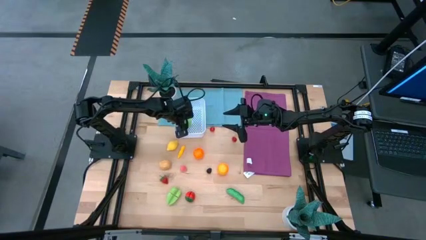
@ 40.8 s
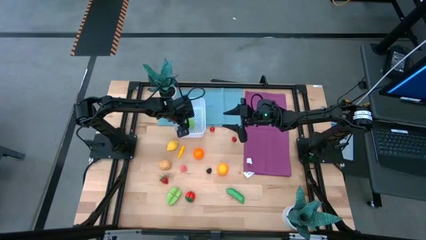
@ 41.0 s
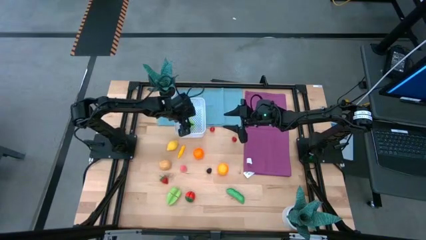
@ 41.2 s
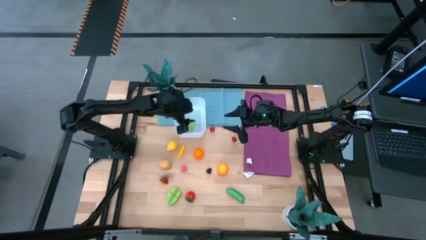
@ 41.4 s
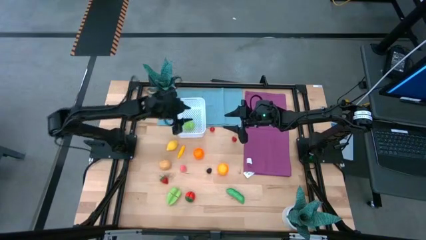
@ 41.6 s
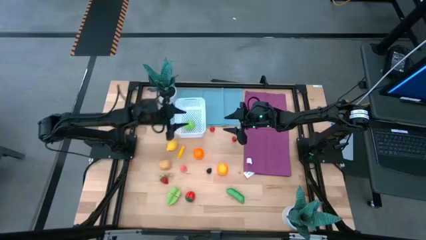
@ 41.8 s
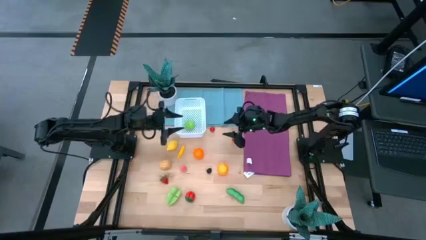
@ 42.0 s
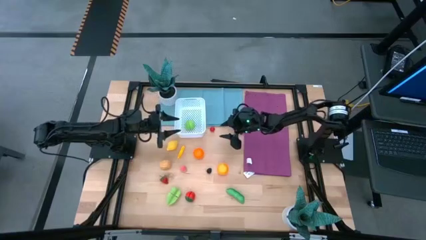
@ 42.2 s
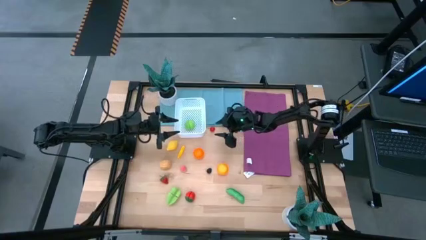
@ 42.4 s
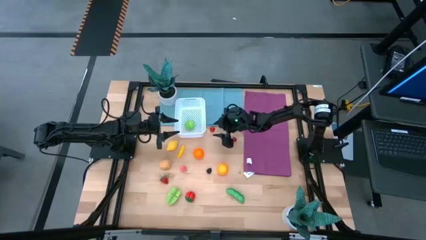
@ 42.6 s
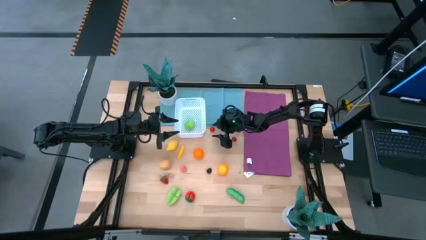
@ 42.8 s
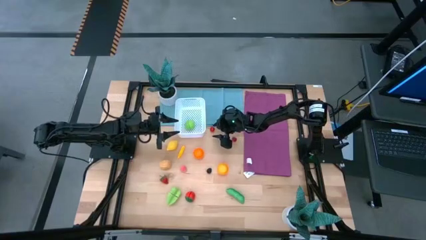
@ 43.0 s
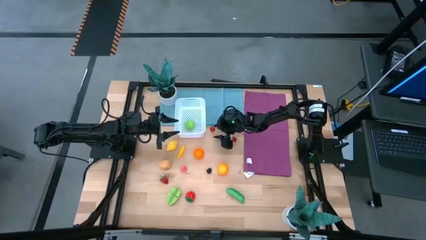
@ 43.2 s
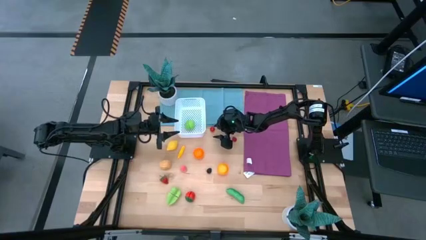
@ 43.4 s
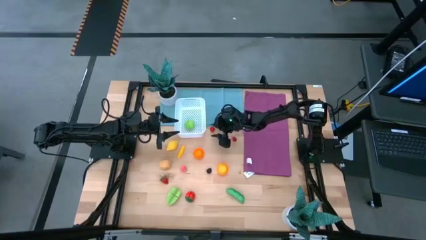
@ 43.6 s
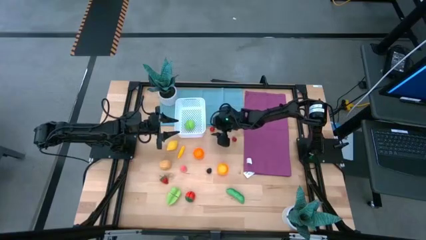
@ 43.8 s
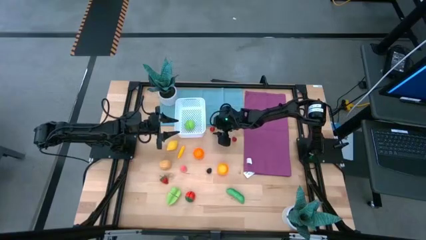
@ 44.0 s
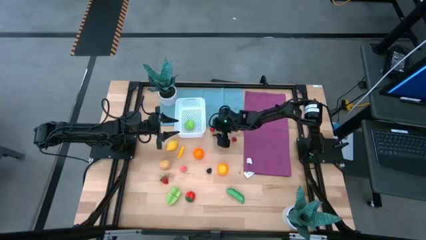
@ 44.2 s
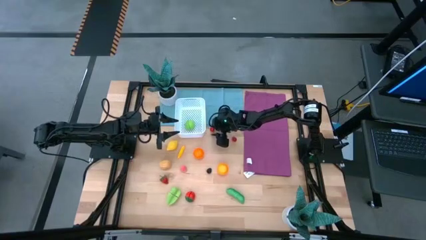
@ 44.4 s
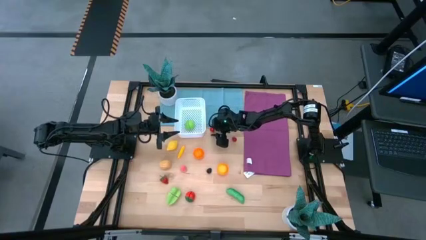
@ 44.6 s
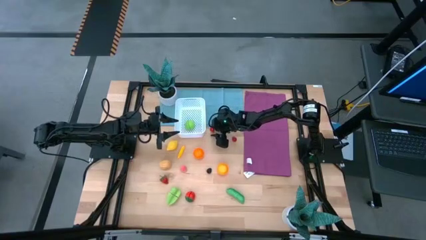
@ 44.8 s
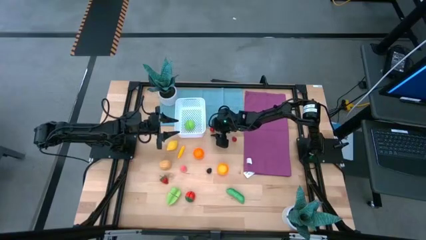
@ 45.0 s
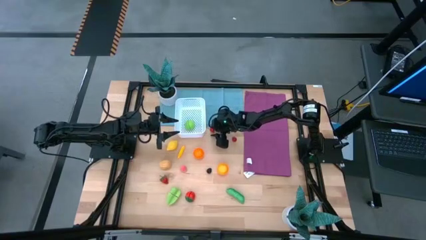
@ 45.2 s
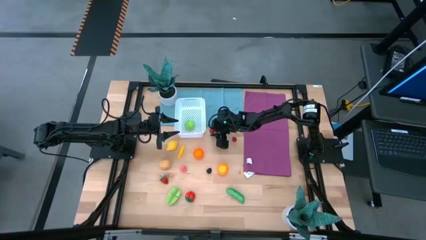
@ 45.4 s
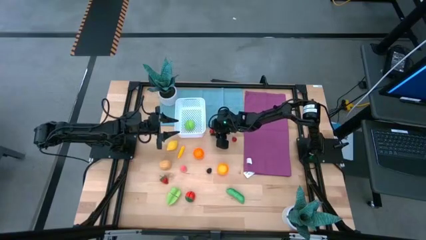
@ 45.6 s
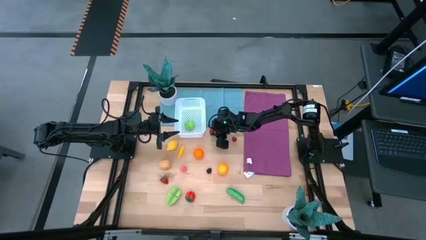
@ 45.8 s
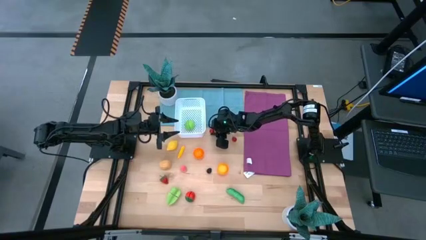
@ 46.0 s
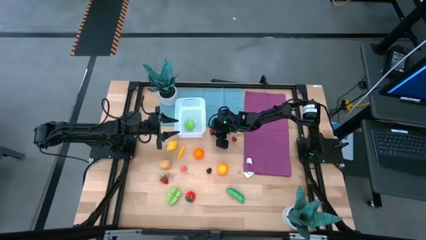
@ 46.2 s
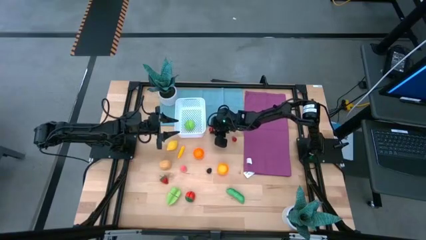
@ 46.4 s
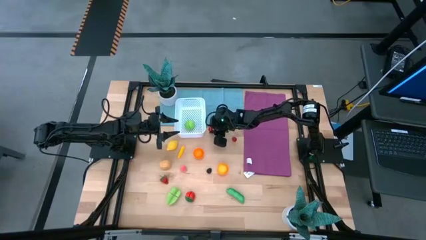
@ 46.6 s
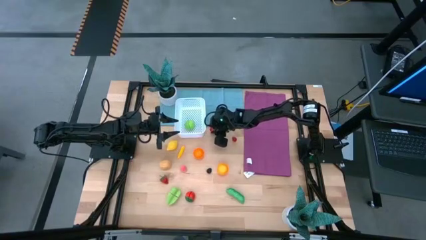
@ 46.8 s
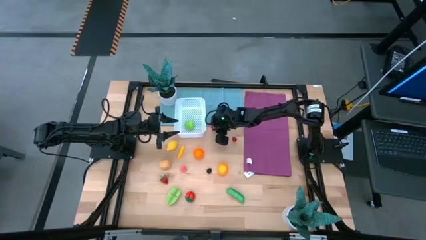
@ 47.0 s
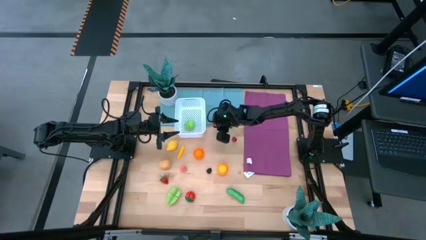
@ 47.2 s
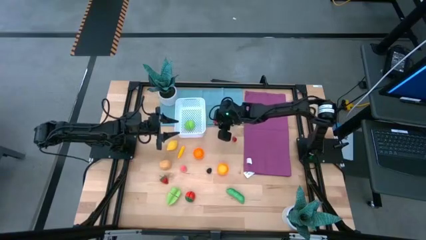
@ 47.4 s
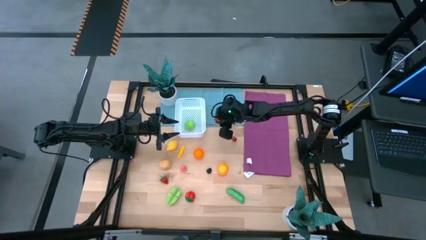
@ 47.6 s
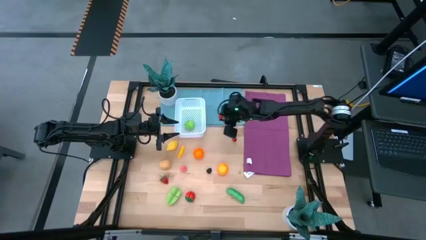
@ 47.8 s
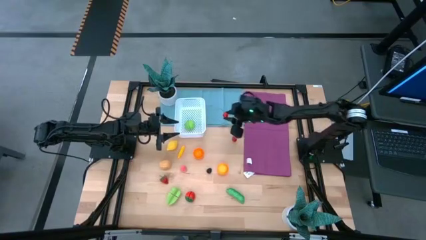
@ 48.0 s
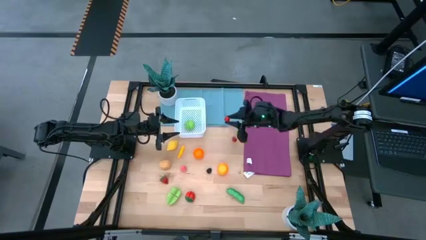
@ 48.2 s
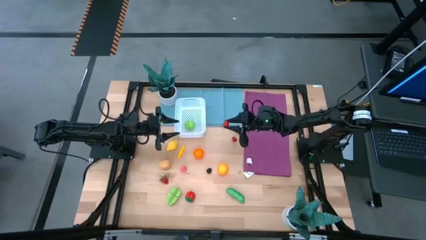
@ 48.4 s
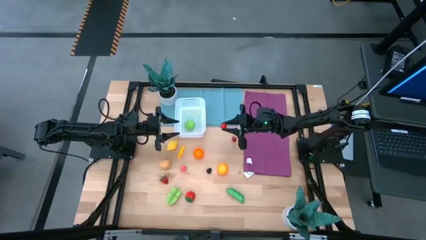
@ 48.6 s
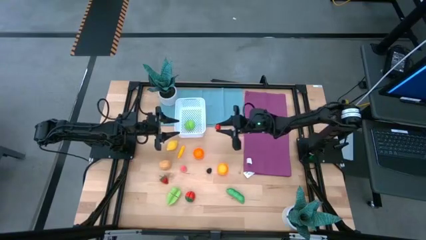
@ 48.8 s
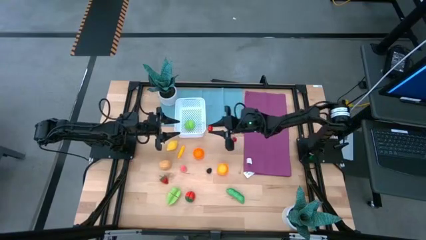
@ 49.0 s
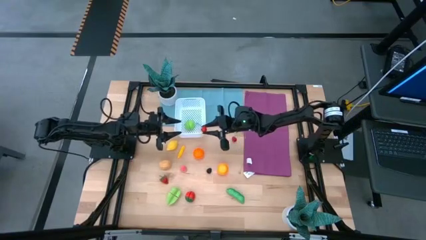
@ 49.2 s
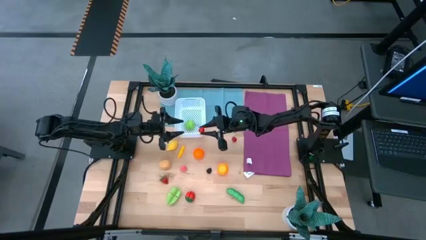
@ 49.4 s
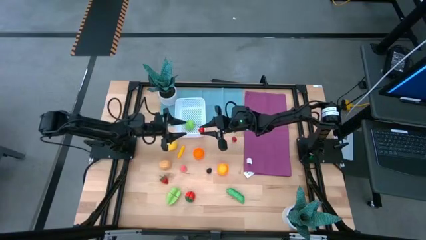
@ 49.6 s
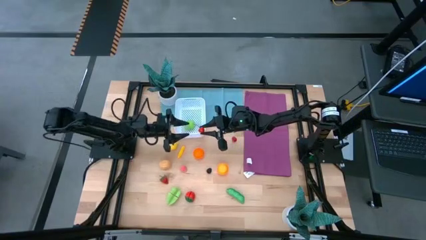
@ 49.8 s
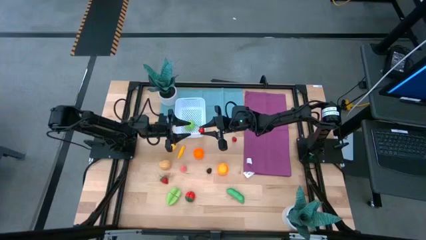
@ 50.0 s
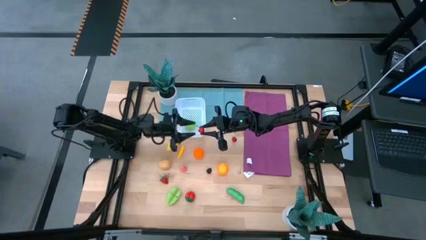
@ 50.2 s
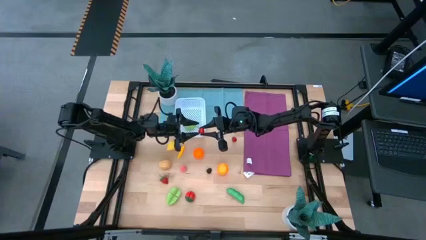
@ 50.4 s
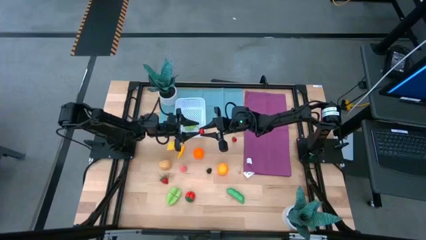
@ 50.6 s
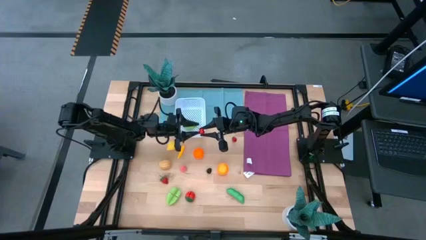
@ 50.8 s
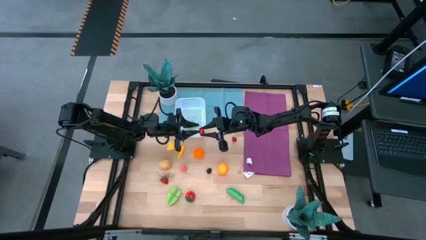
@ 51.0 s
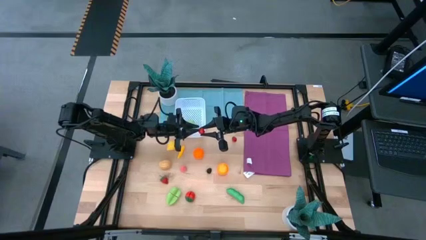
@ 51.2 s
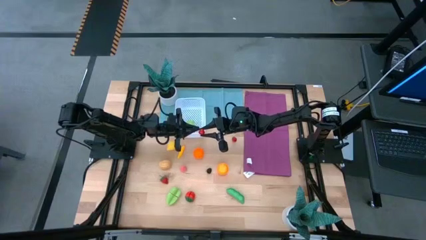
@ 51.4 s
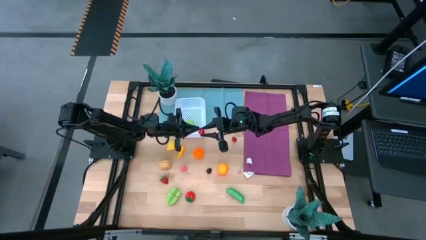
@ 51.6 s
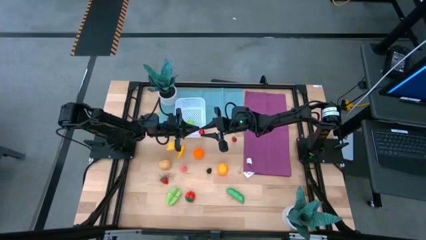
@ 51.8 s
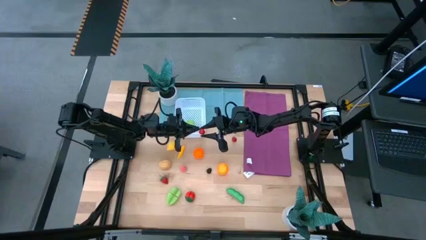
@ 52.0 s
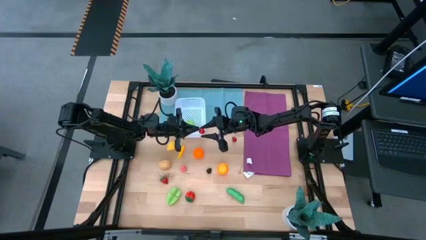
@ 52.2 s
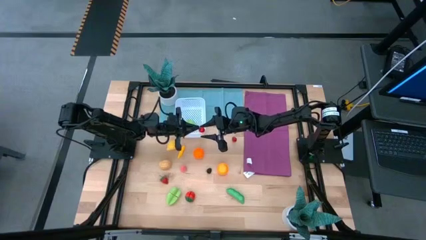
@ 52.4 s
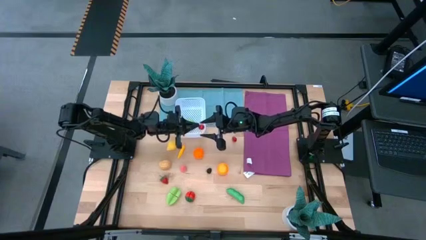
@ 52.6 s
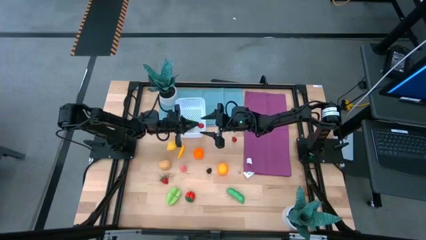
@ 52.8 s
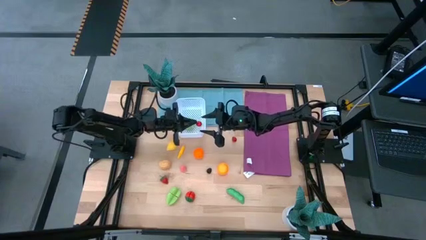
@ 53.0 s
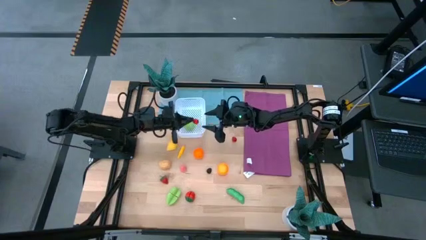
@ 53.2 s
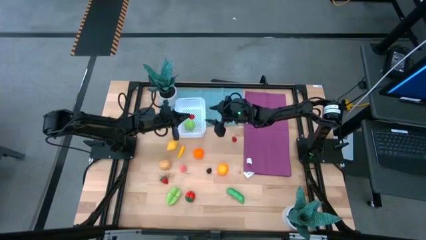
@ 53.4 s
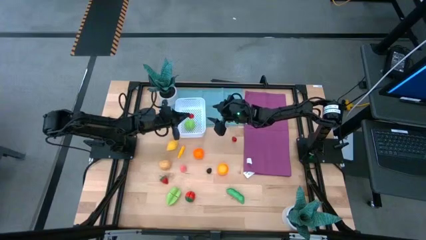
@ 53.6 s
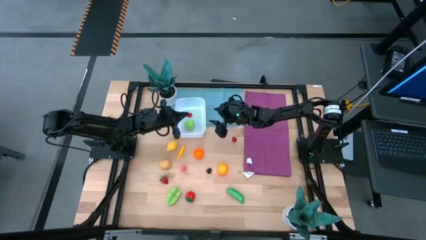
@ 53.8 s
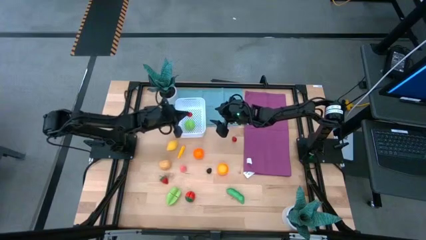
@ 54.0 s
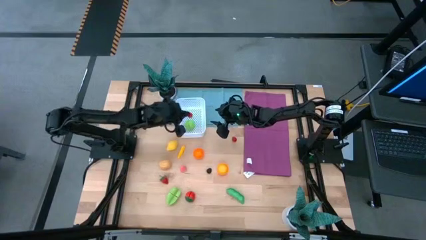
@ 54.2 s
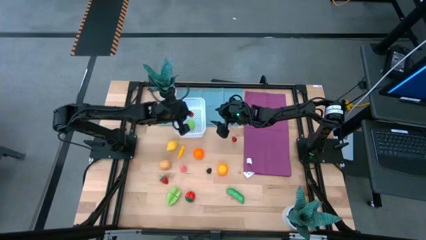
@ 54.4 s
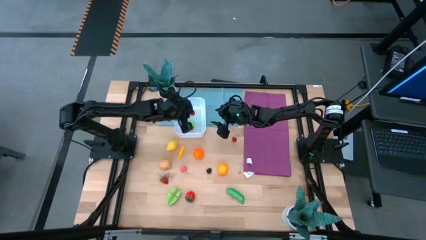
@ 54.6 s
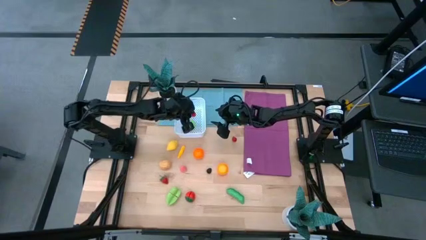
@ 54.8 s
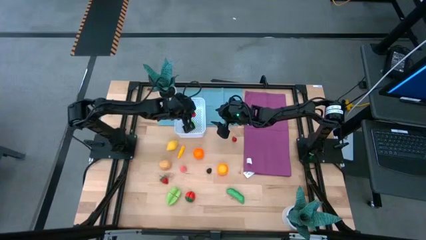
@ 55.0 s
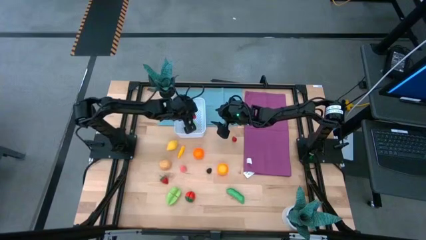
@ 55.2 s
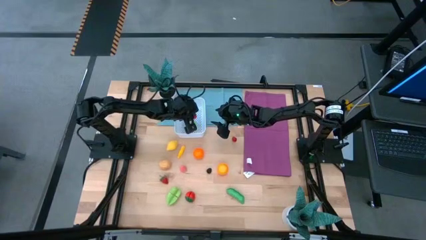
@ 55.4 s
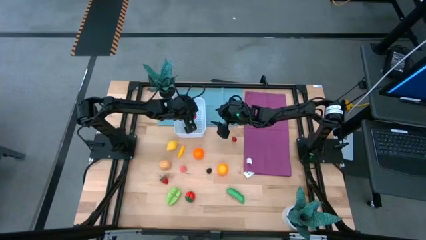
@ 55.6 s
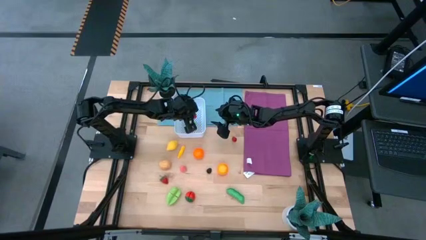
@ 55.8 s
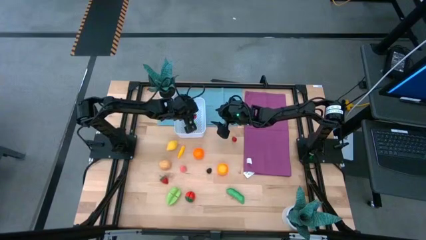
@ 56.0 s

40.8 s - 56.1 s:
Task: Pick and placing Produce into tupperware
Put the red cherry into the white basket

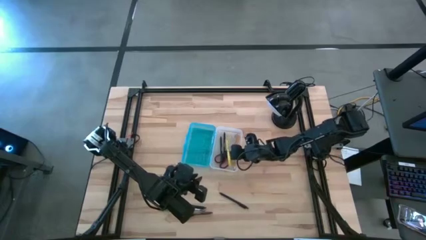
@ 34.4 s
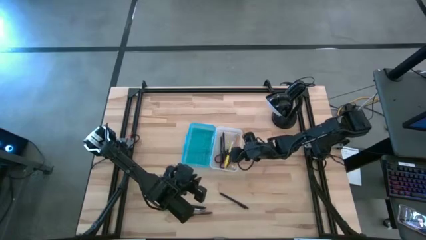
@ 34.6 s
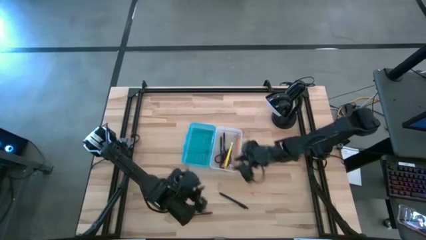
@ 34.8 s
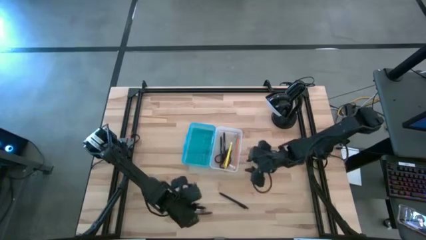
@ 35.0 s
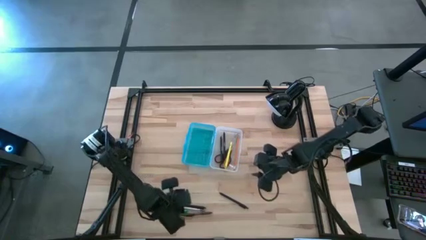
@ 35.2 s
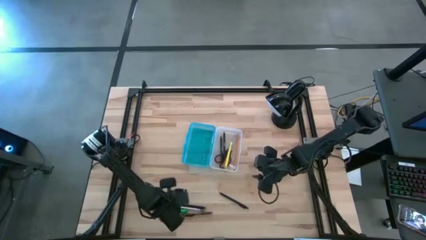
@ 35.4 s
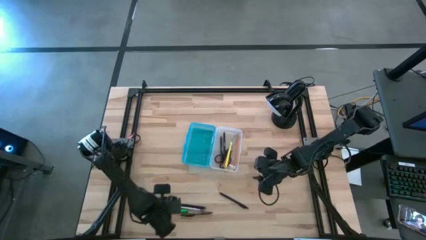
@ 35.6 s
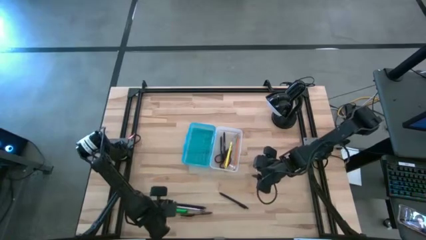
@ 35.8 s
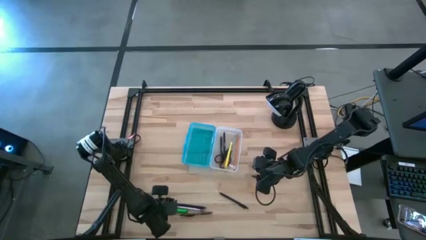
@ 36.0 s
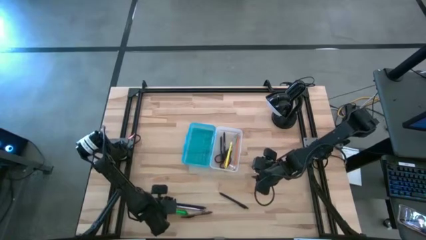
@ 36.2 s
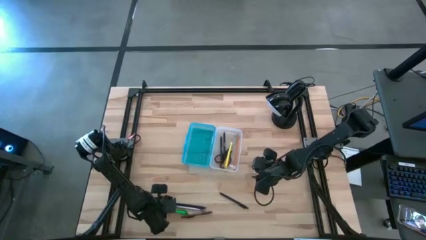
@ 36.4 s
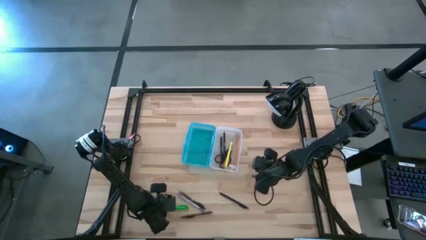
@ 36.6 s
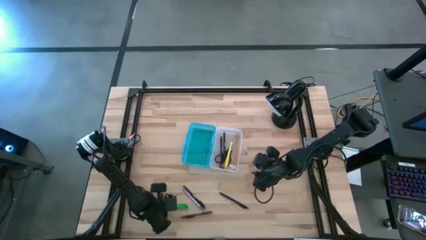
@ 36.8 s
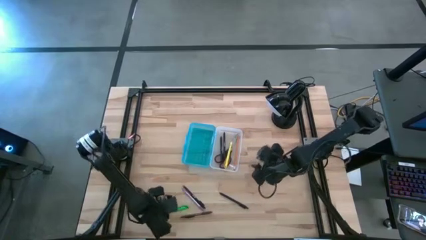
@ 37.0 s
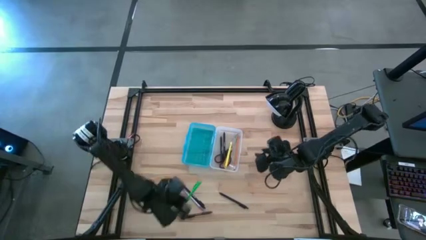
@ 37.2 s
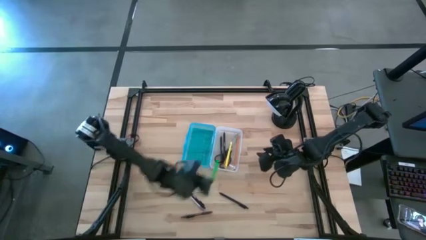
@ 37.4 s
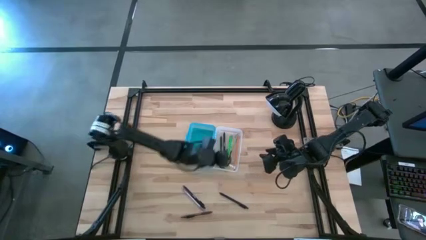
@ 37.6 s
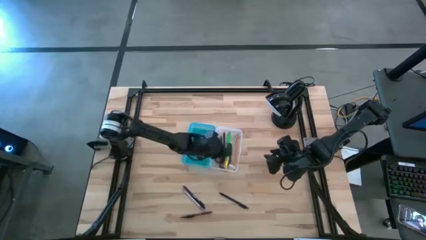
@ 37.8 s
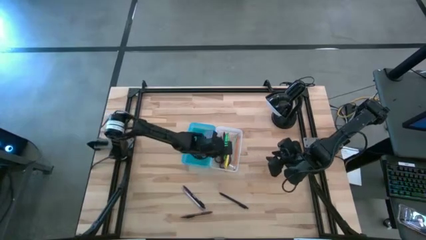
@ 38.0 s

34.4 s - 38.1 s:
Task: Pick & place school supplies into a supply box
Put the green pen into the supply box
